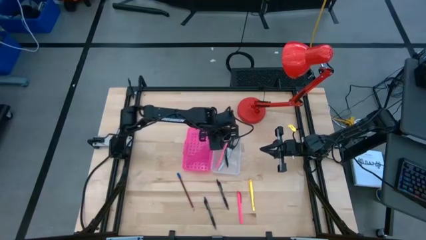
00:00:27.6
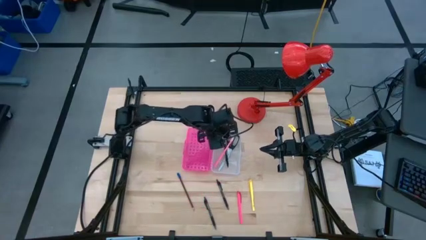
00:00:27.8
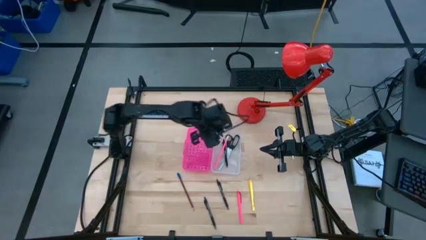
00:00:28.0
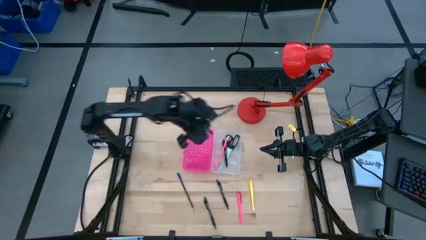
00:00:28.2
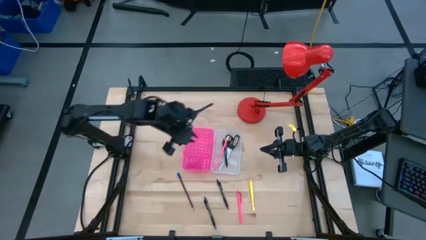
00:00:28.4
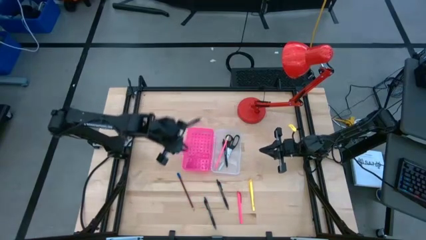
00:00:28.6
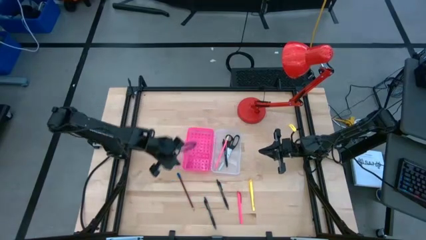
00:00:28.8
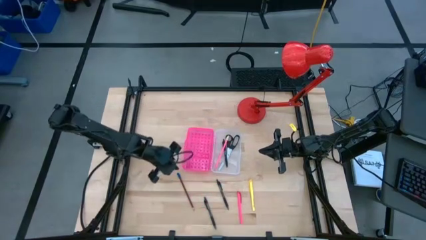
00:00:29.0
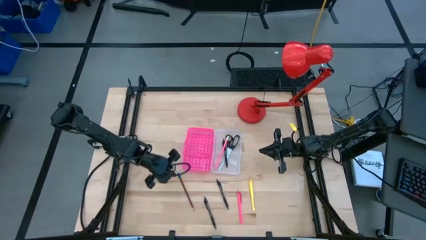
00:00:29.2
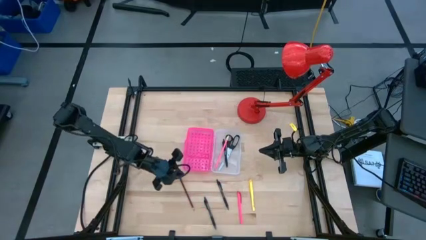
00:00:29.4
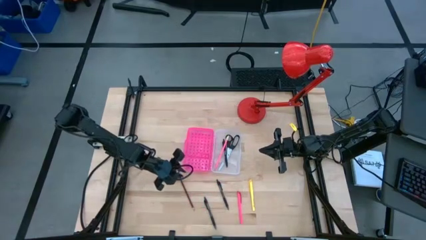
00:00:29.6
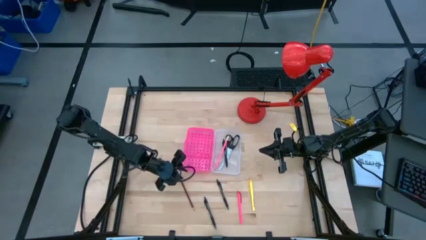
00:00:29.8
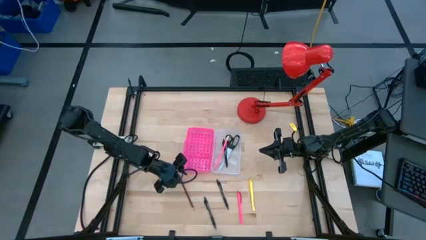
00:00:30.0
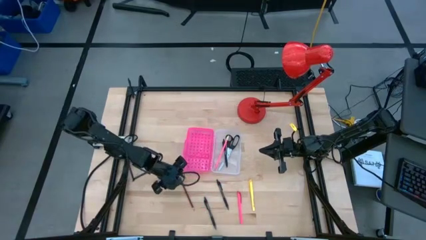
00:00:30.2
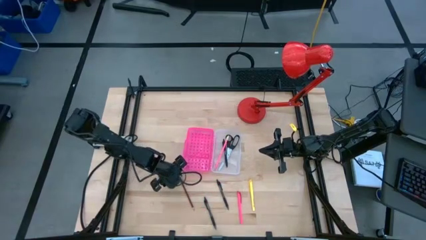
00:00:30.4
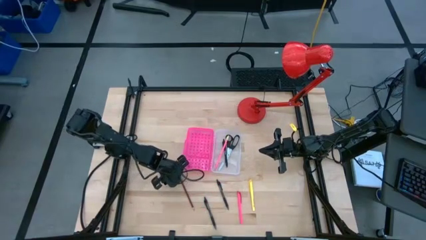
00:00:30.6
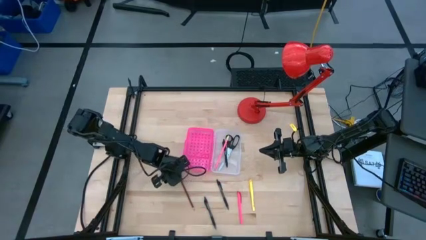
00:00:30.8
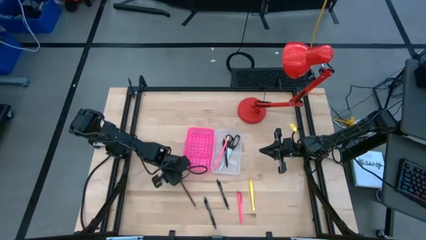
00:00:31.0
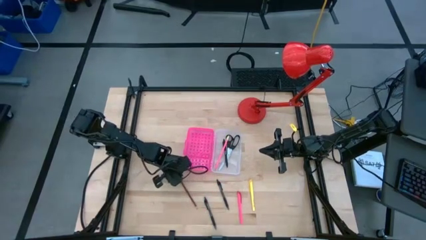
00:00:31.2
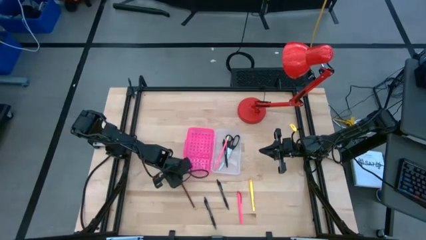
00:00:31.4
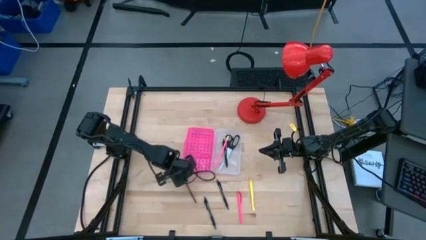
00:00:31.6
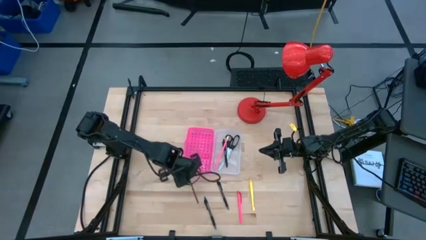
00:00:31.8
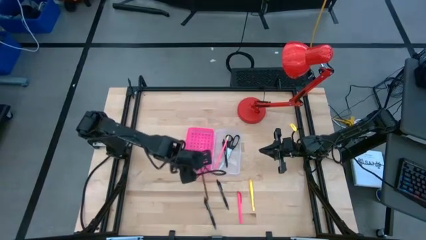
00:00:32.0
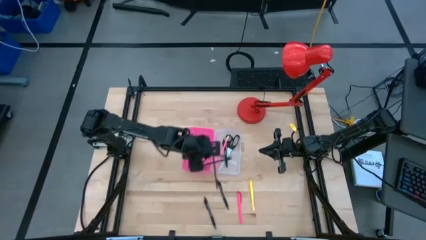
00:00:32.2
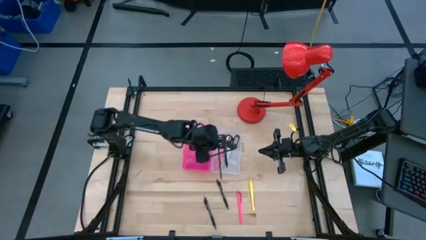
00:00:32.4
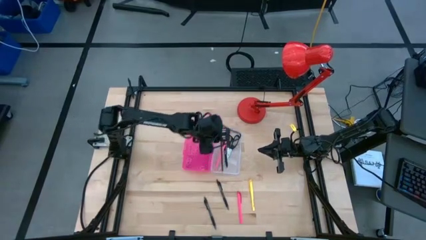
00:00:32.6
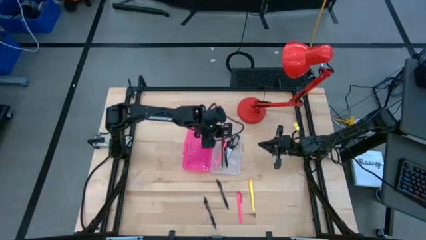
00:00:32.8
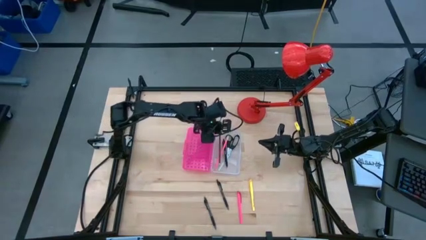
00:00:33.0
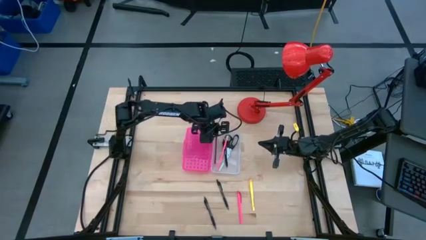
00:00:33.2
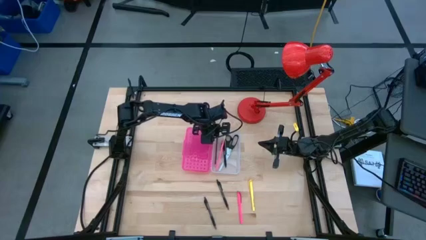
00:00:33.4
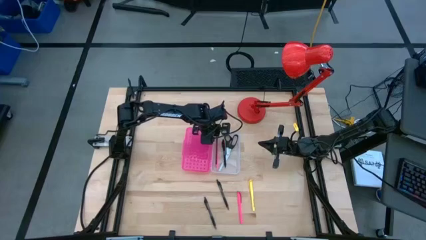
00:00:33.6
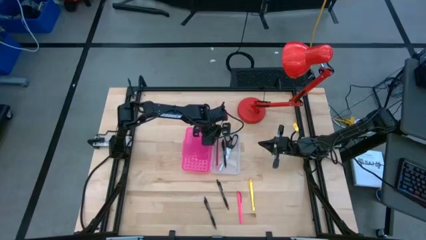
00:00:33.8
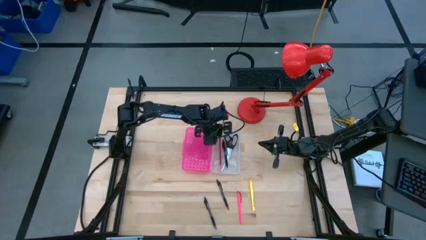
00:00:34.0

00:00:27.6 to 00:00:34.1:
Task: Pick & place school supplies into a supply box
Put the brown pencil into the pink supply box

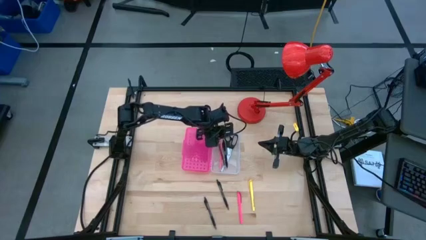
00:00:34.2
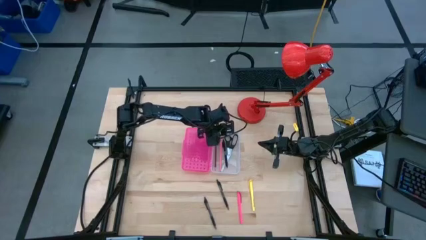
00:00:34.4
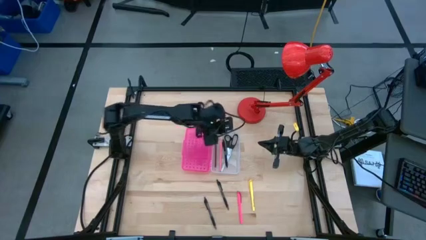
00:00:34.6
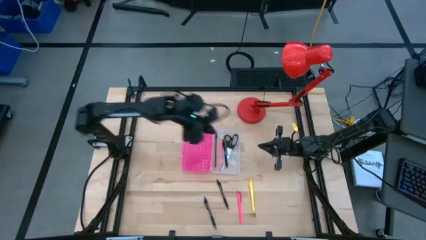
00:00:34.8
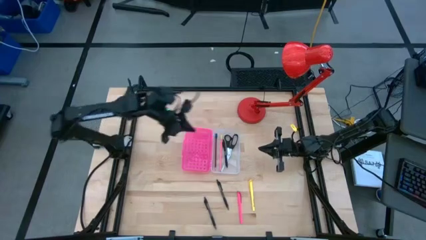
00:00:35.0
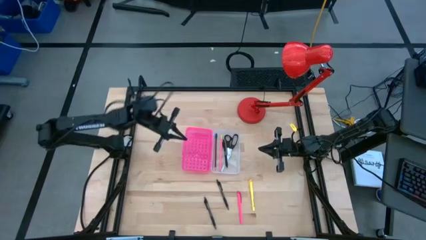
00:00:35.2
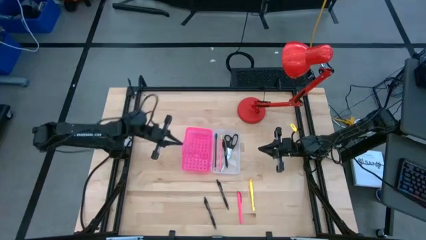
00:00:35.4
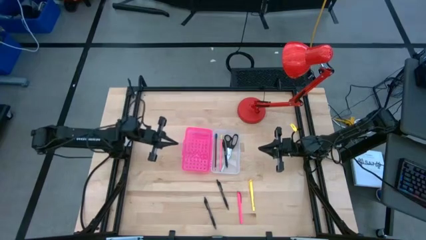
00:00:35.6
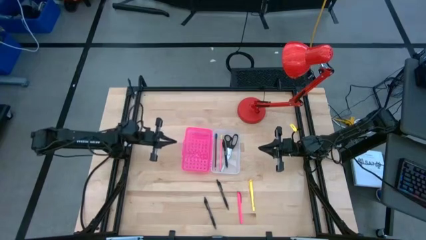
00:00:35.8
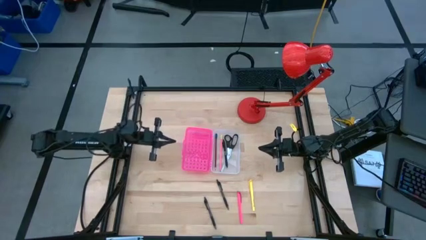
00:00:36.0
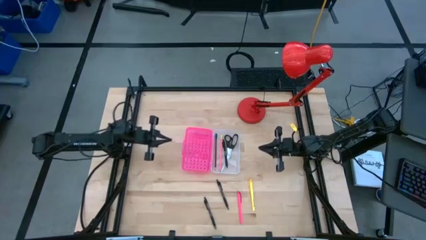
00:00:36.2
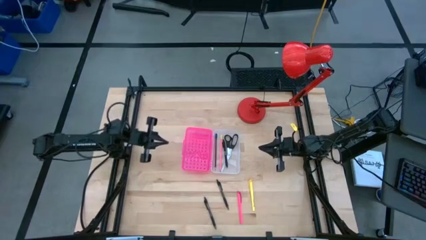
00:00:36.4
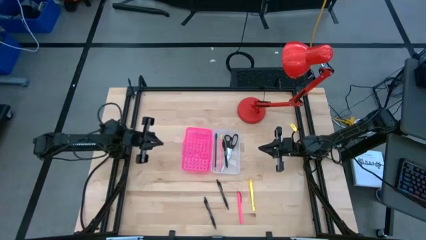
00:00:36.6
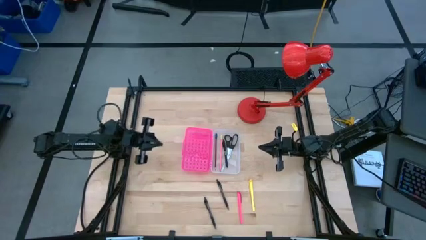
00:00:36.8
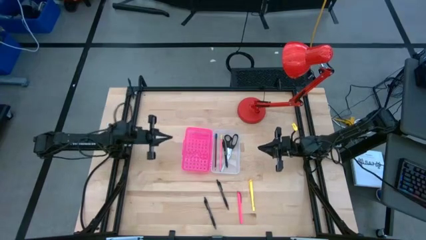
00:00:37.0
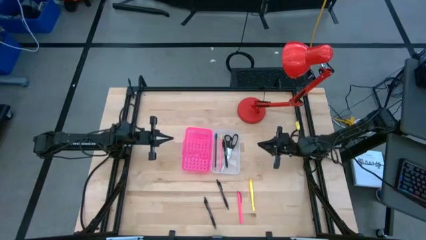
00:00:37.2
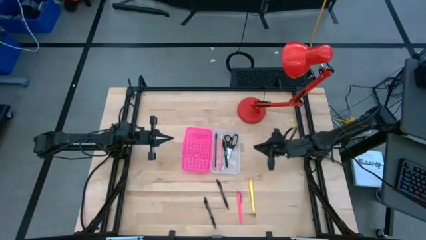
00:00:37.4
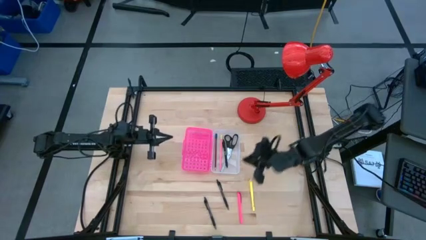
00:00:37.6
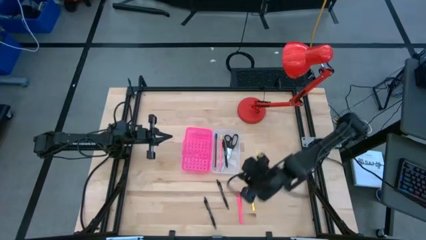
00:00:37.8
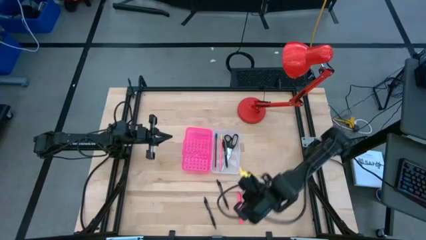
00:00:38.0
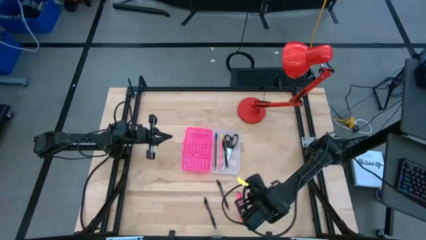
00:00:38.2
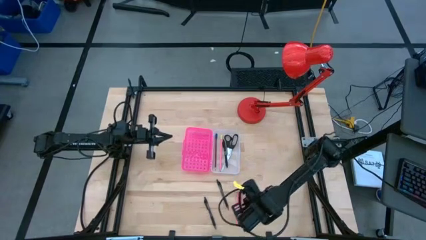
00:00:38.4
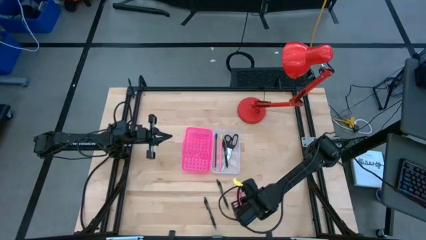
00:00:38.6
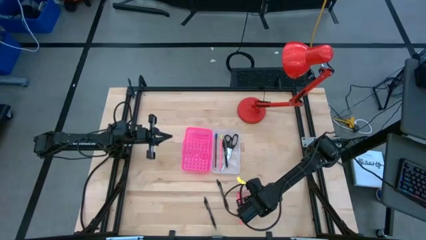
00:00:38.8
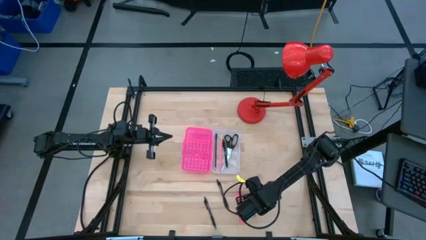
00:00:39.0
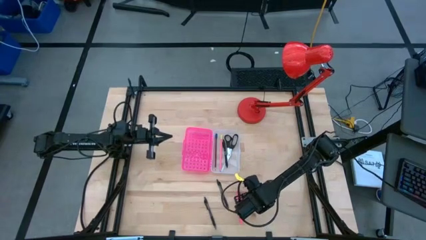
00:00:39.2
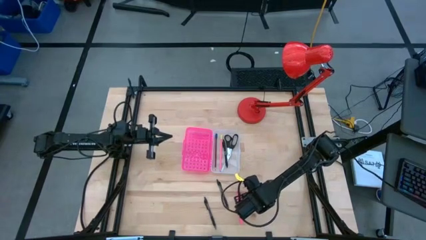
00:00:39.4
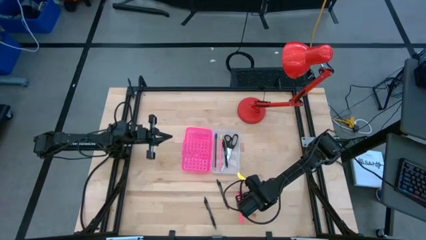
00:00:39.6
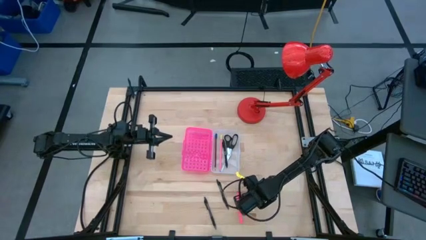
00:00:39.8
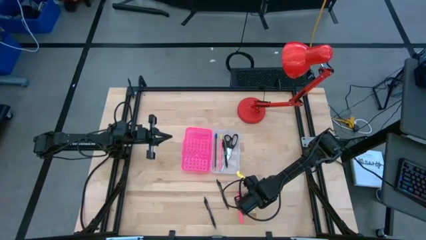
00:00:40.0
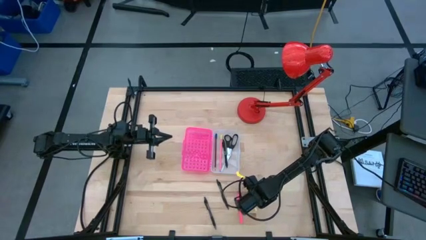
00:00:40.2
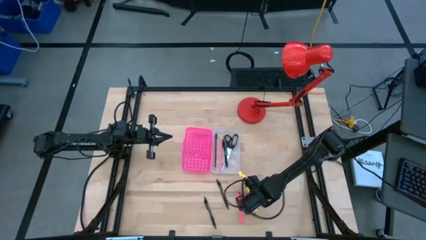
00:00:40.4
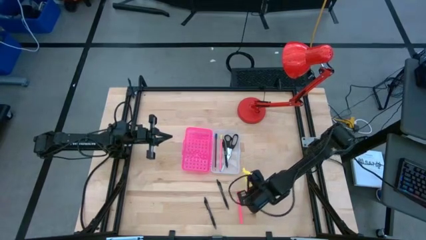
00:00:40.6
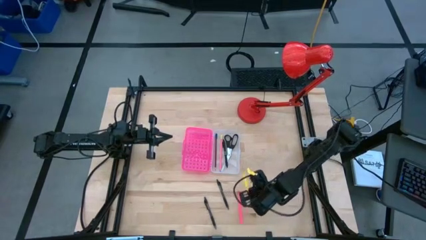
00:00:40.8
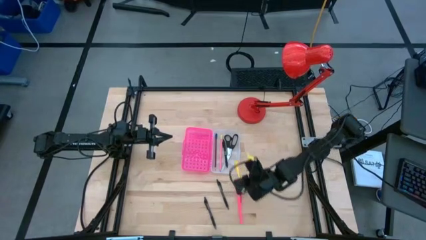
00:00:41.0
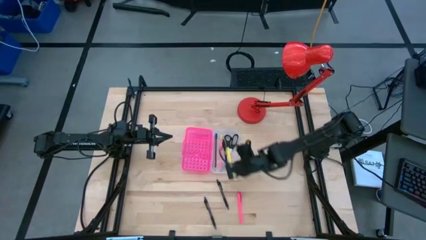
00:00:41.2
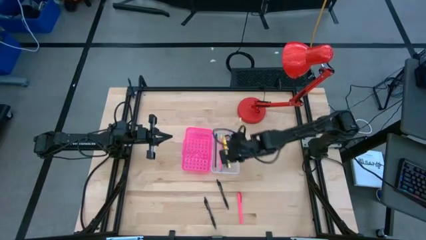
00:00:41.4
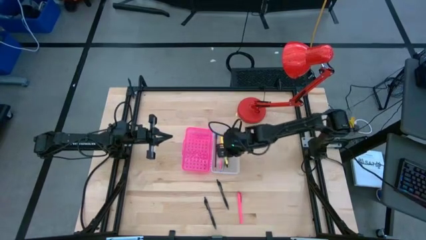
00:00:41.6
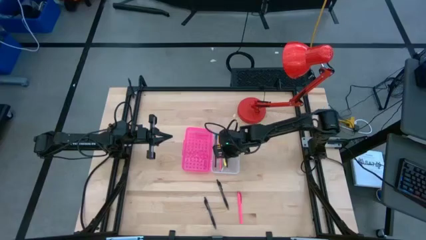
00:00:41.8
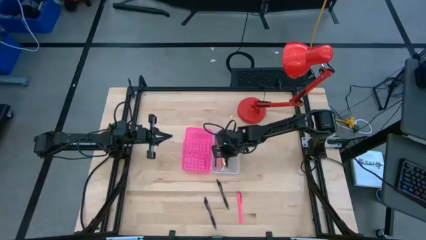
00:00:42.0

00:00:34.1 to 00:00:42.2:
Put the yellow pen into the pink supply box

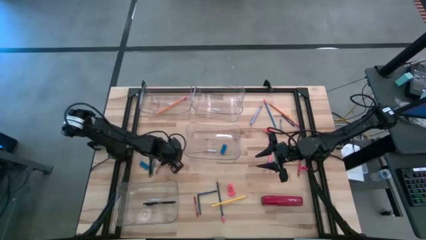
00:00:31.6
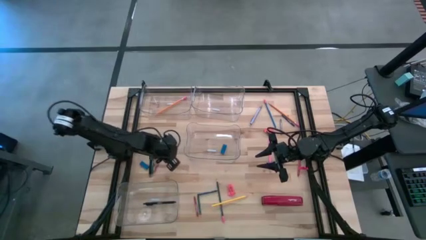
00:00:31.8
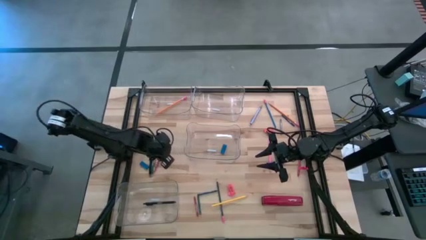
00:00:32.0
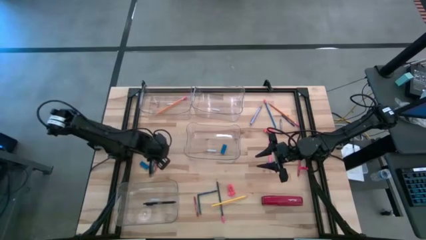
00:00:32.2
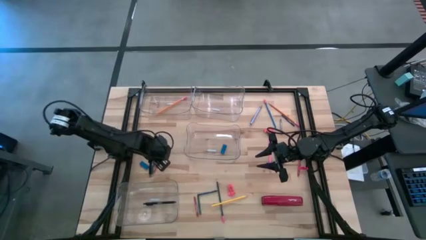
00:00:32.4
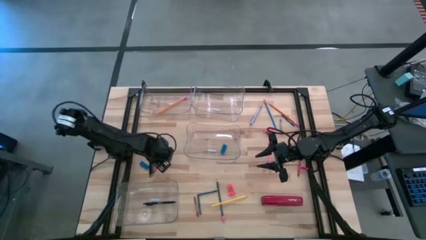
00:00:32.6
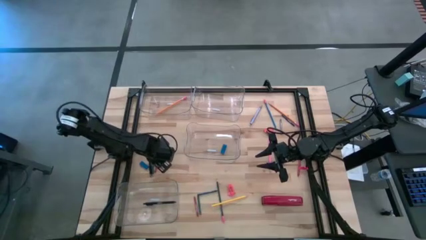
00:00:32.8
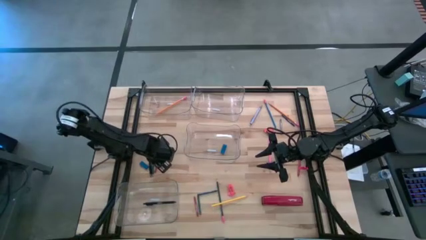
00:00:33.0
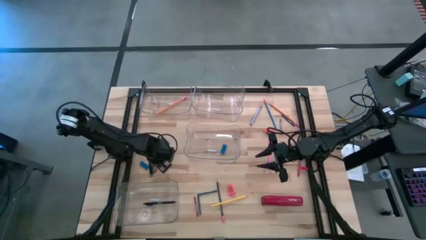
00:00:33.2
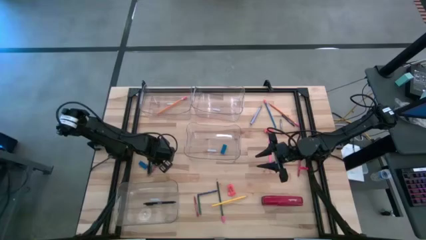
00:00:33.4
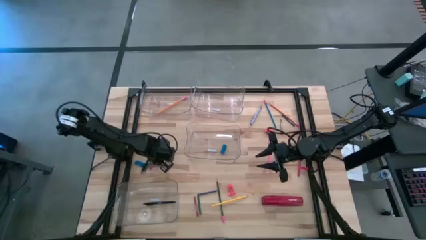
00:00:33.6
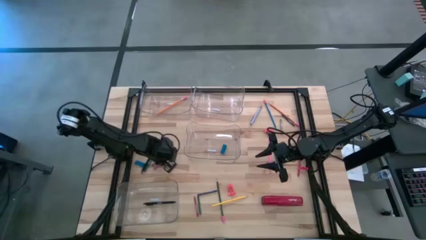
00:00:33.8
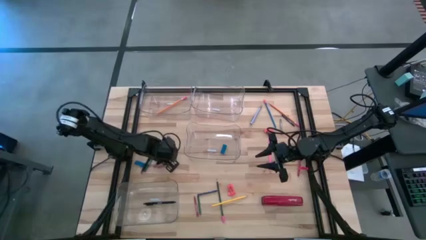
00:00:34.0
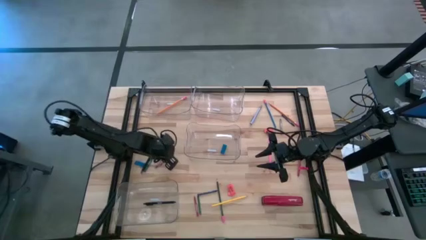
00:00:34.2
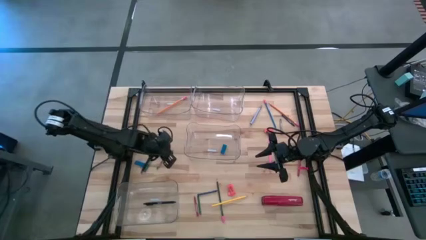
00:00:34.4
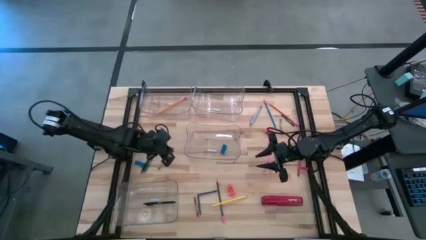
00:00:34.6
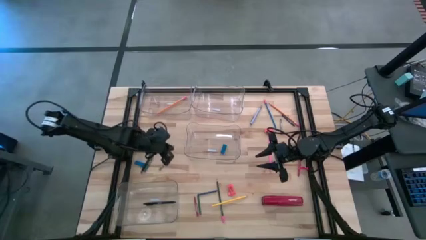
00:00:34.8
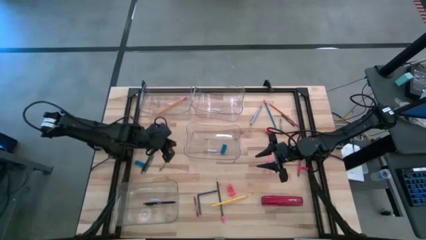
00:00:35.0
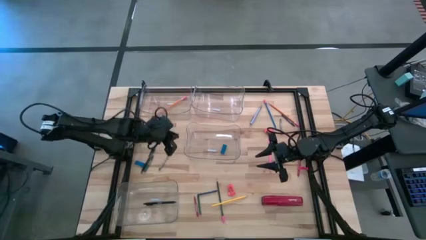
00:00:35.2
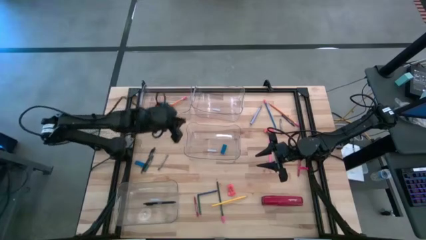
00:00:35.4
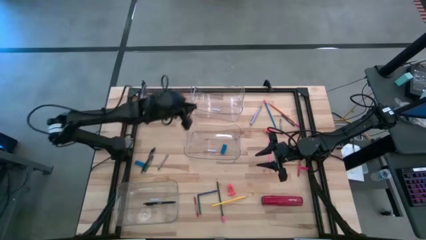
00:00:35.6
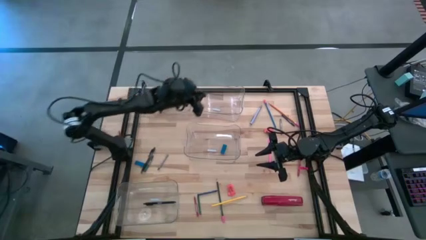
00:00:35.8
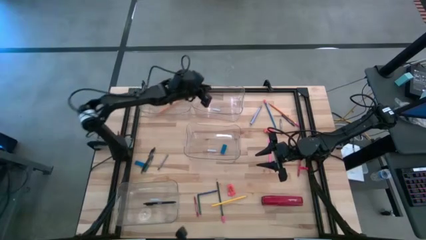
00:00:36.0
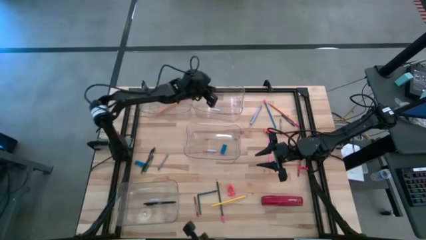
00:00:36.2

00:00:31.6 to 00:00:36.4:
Task: Sort crayons/erasers/pens/pencils in bins
Put the top left red crayon into the top right transparent bin
